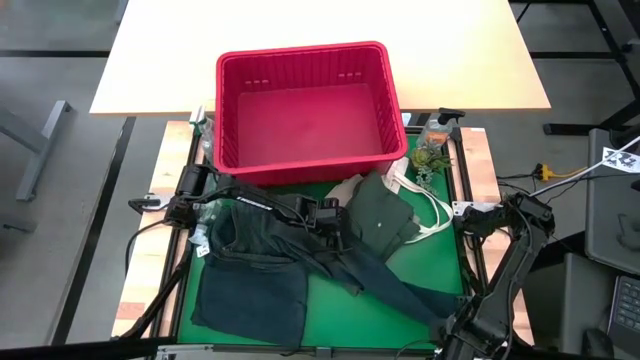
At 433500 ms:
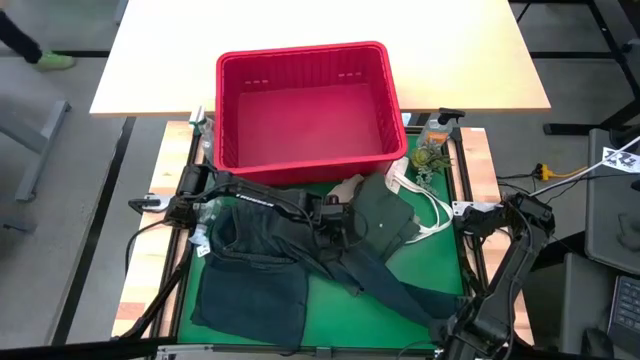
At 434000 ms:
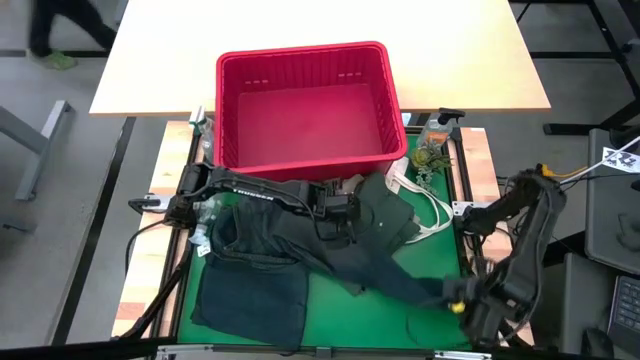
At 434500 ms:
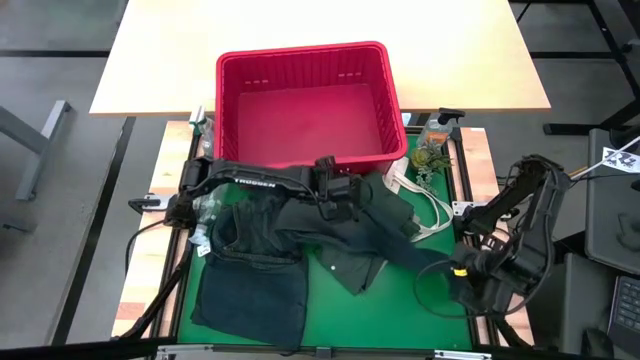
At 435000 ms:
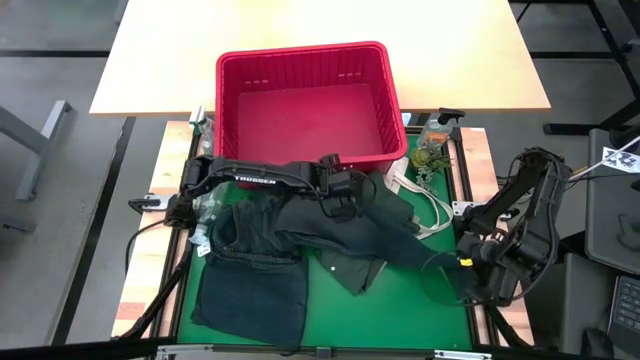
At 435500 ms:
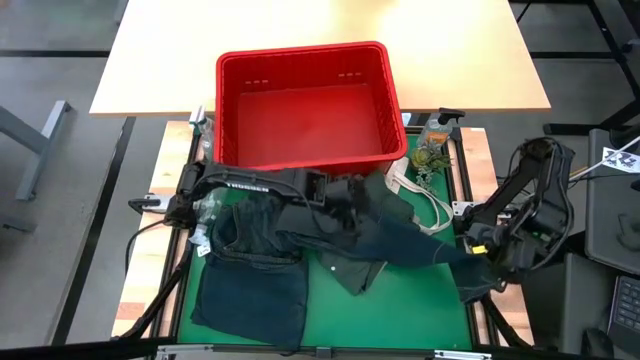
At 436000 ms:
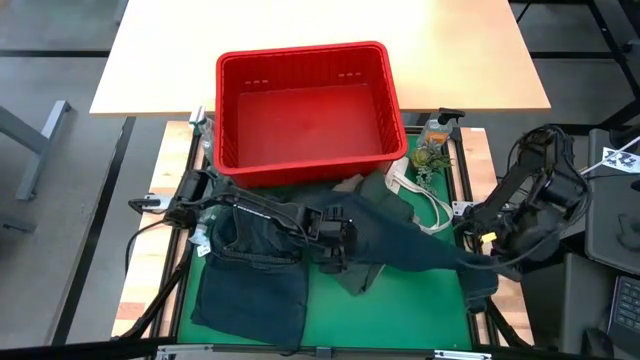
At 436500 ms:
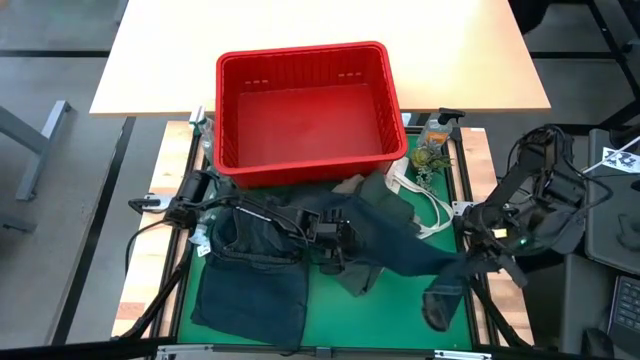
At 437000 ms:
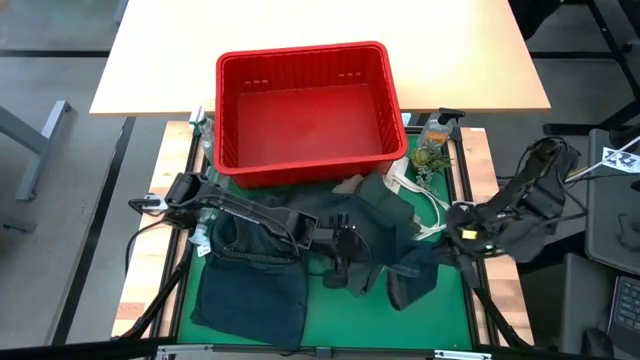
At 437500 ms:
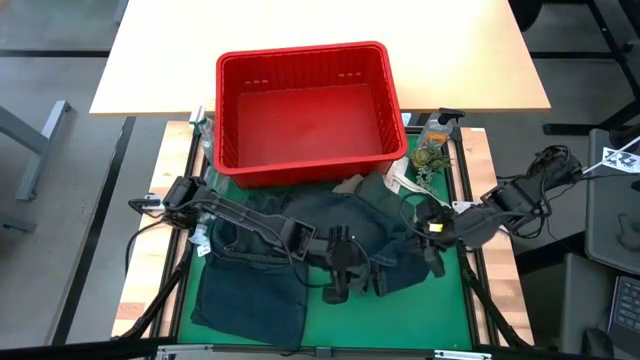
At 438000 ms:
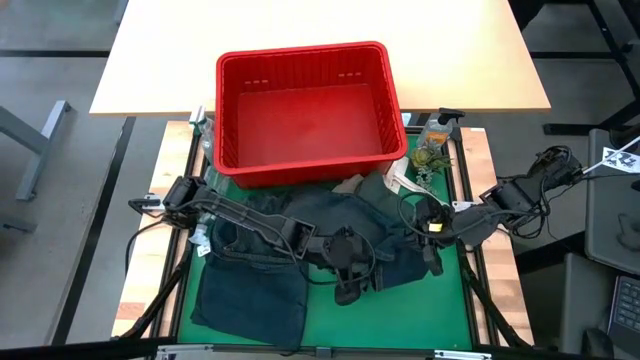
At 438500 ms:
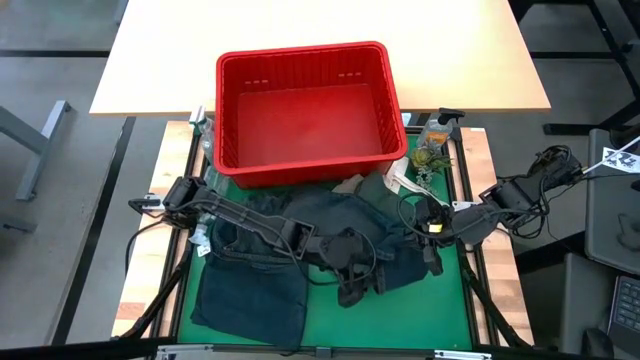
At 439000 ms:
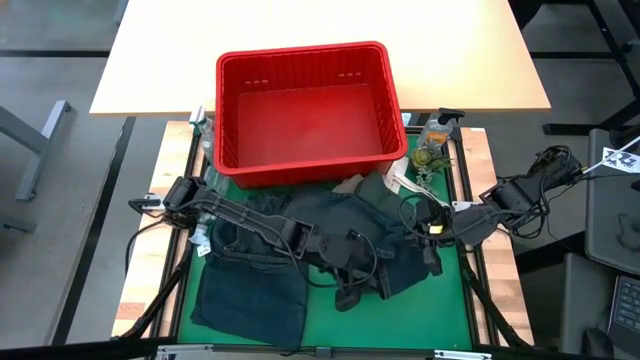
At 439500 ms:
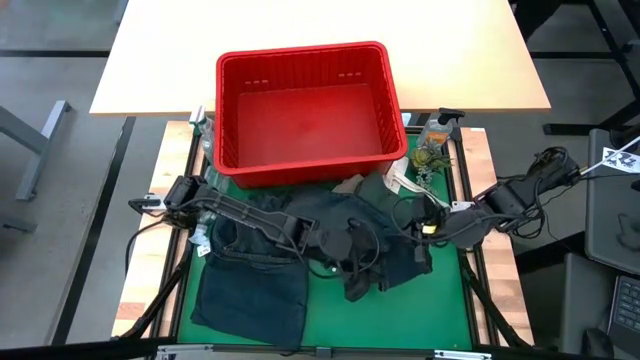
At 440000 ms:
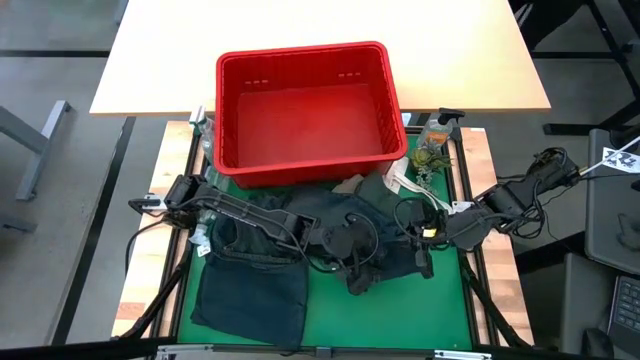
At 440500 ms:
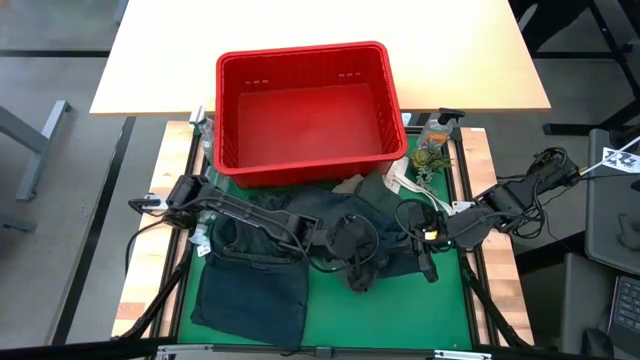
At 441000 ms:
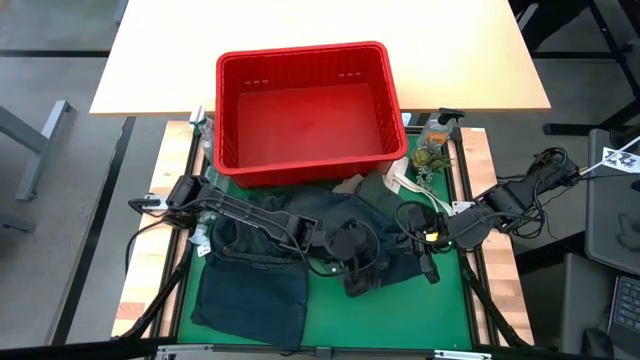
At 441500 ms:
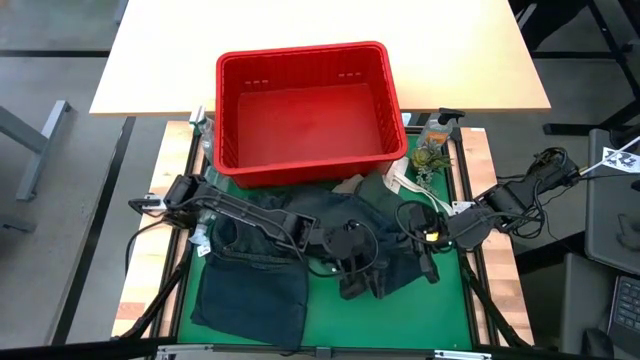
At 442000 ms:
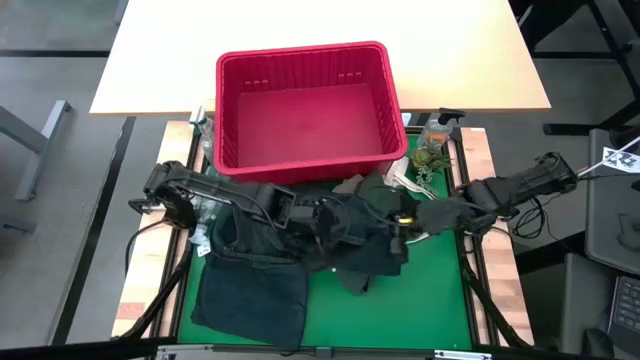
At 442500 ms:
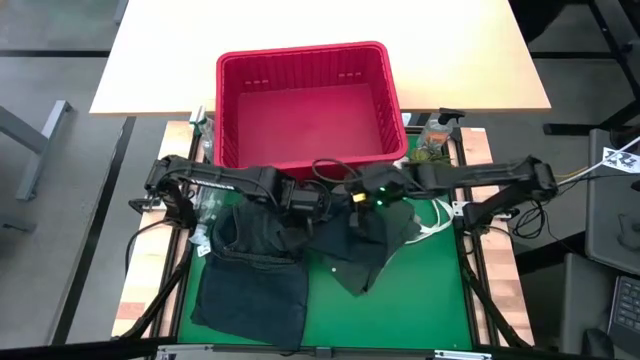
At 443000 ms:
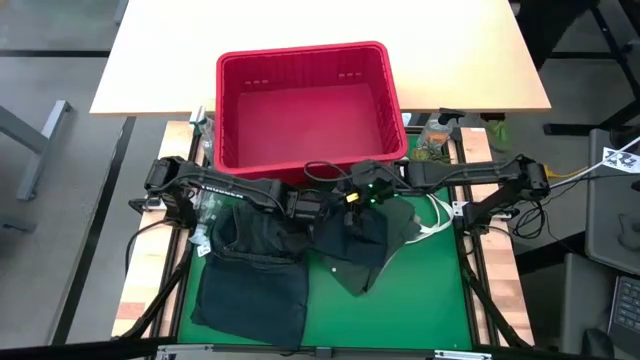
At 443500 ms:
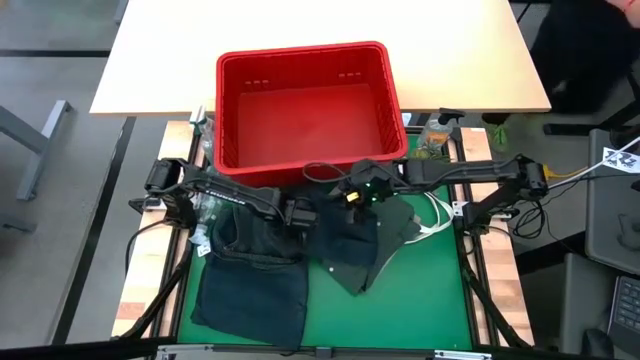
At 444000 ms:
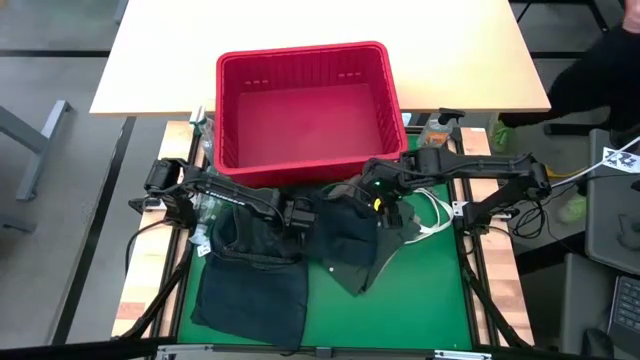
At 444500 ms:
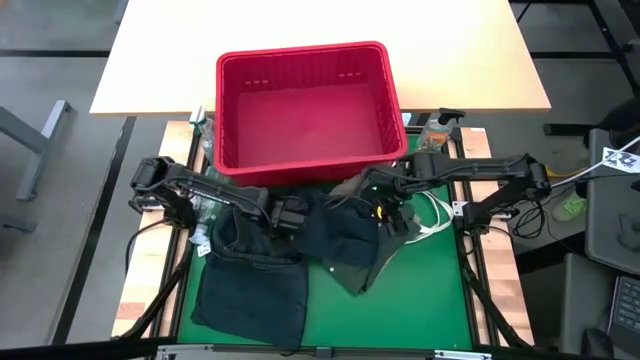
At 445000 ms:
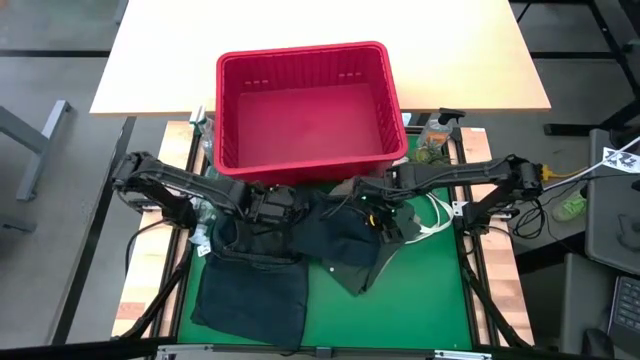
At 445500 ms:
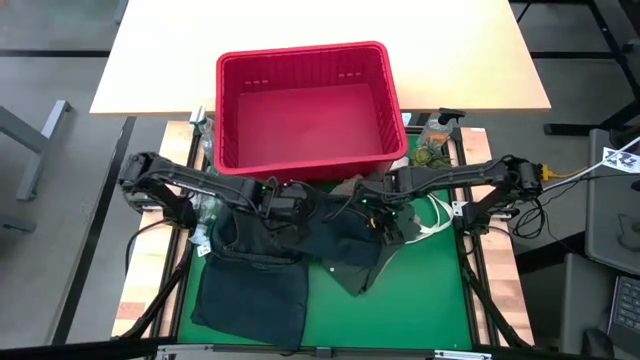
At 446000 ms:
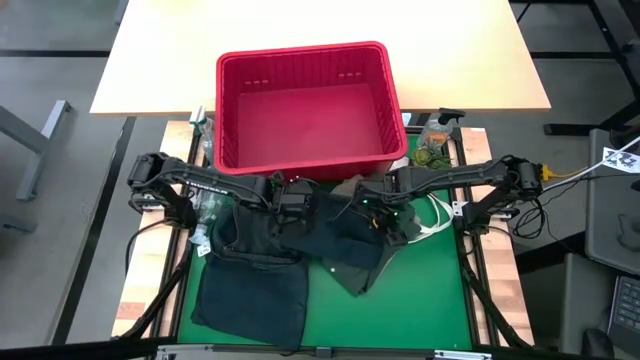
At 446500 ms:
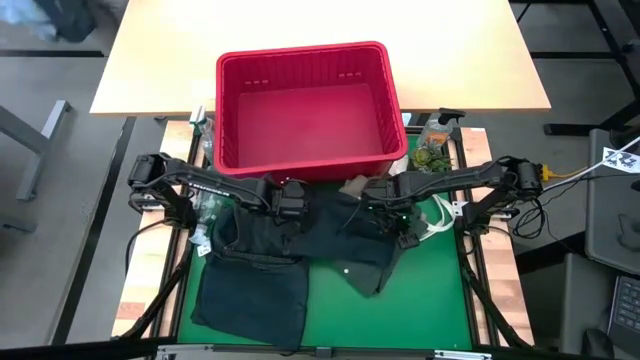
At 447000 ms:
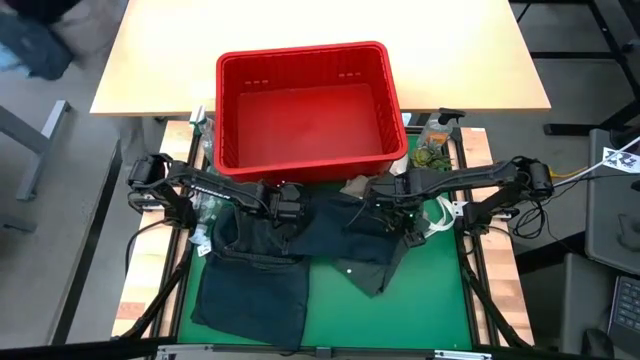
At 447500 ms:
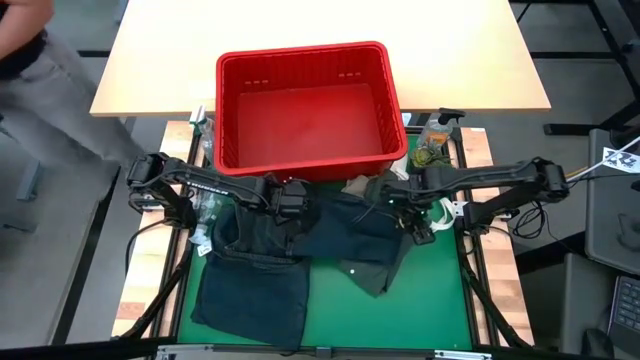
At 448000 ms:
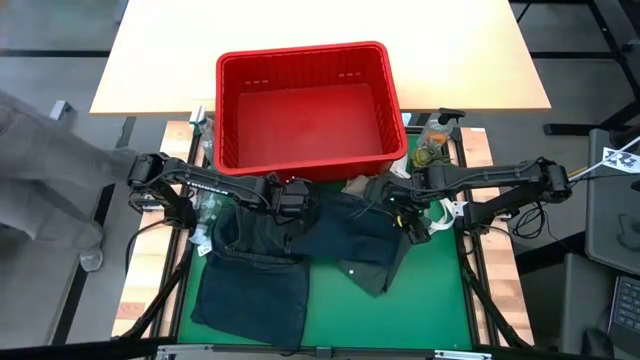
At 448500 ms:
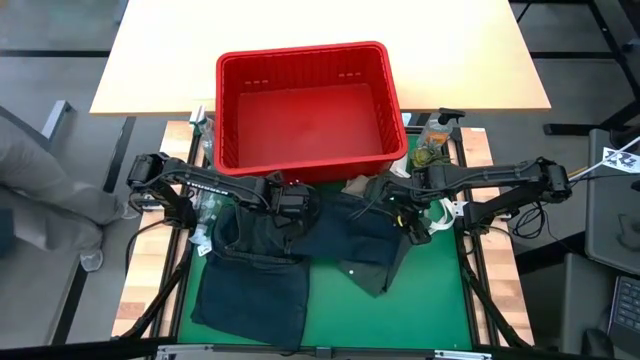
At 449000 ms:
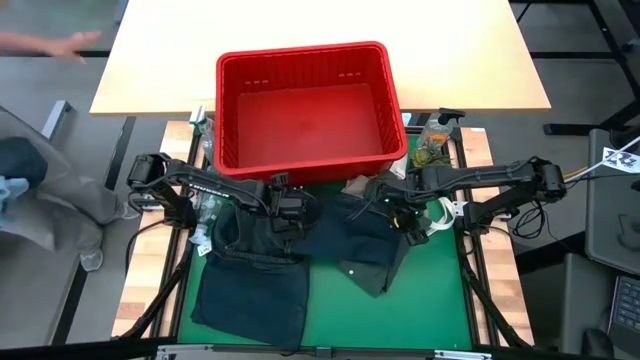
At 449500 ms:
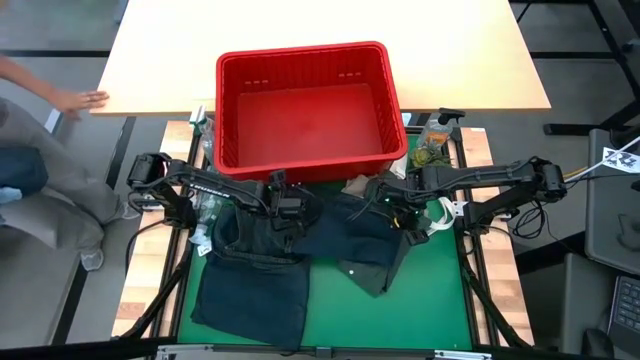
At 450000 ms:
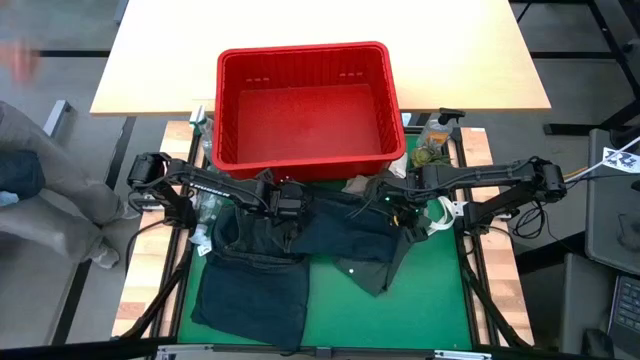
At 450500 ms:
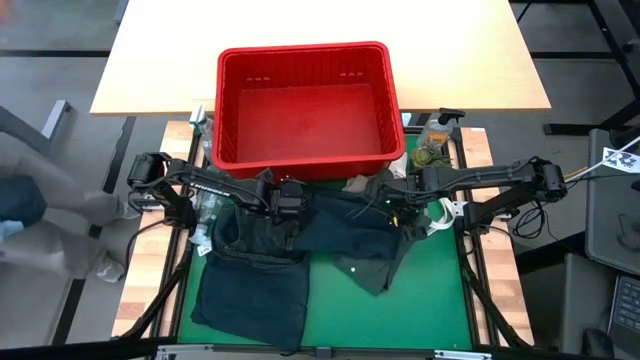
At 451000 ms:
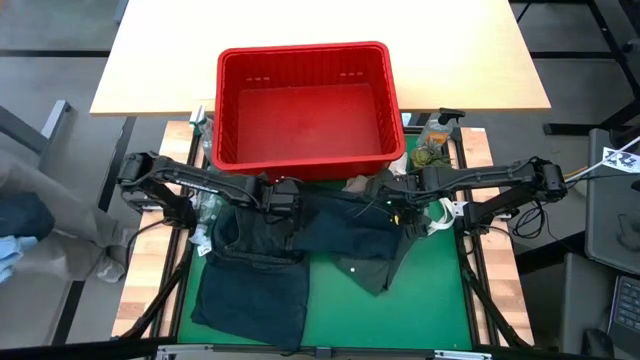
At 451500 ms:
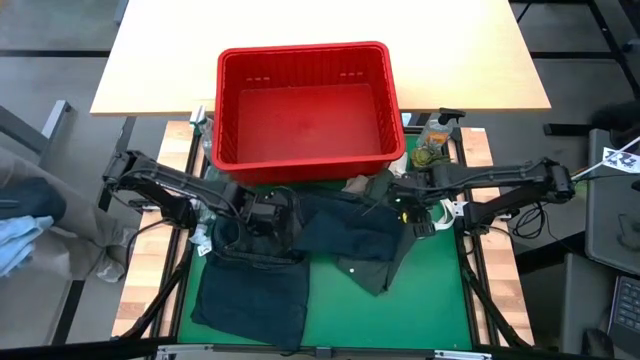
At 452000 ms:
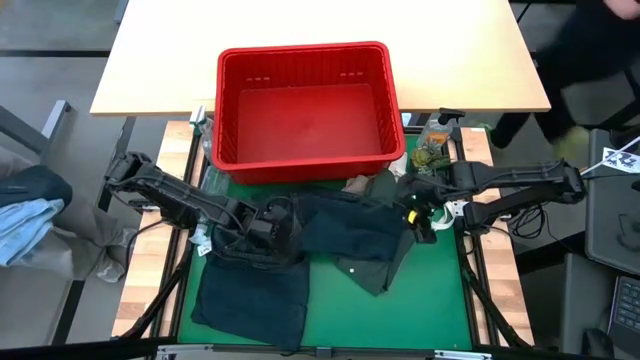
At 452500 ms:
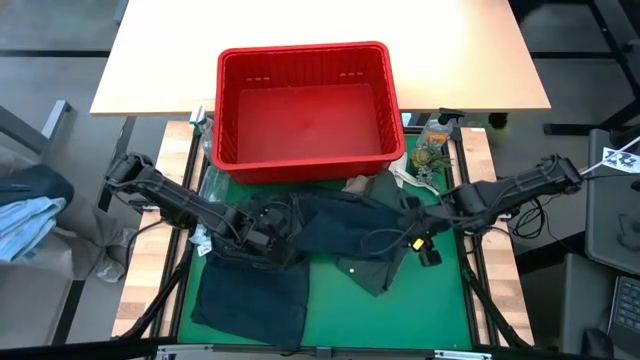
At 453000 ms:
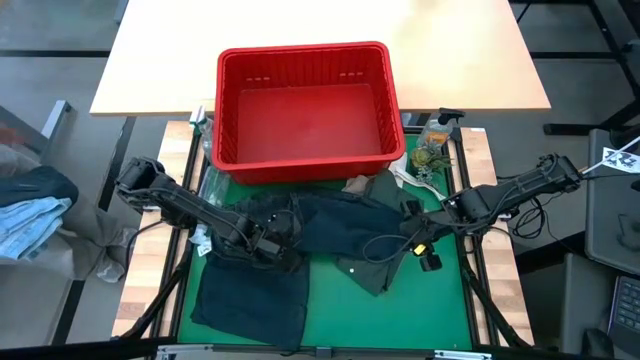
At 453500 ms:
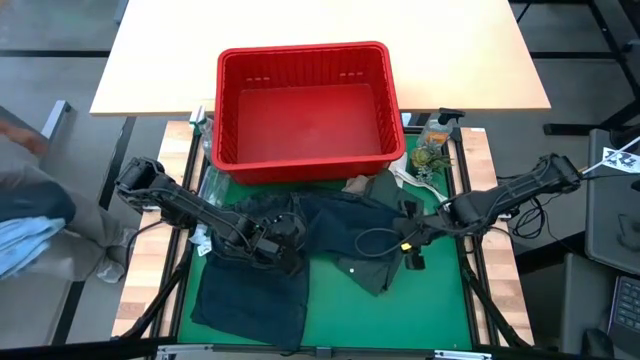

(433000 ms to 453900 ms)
Task: Fold laundry
Fold the dark blue pants
